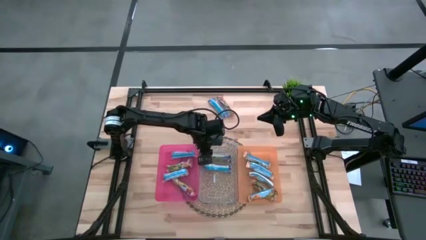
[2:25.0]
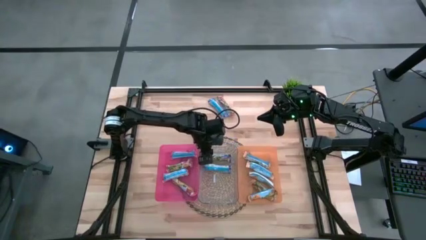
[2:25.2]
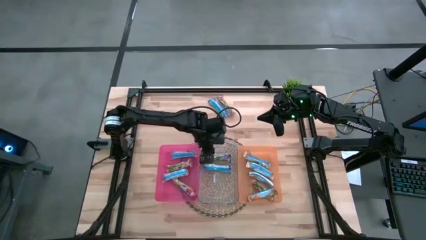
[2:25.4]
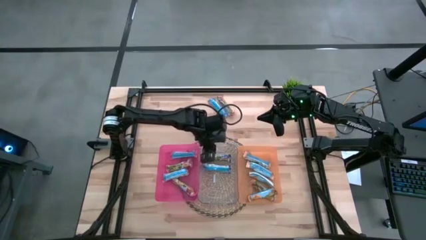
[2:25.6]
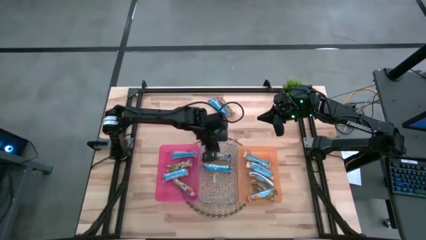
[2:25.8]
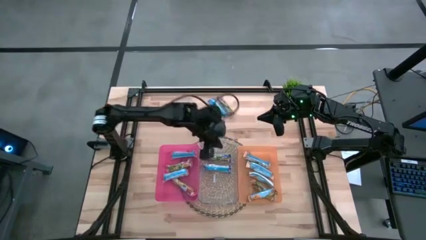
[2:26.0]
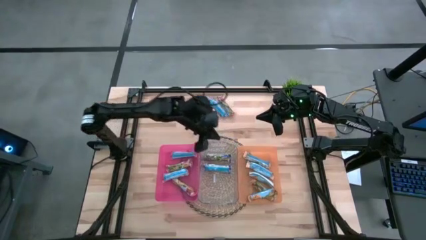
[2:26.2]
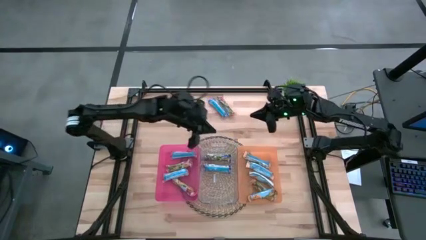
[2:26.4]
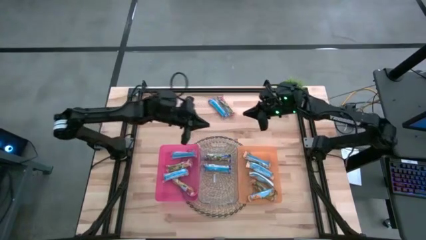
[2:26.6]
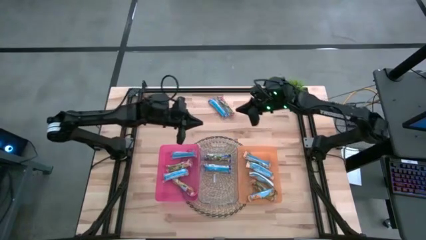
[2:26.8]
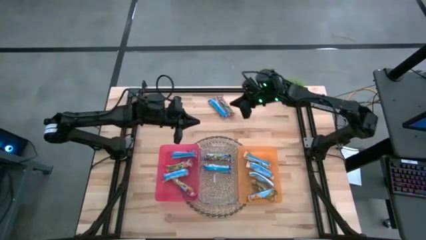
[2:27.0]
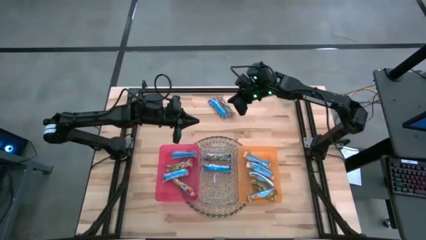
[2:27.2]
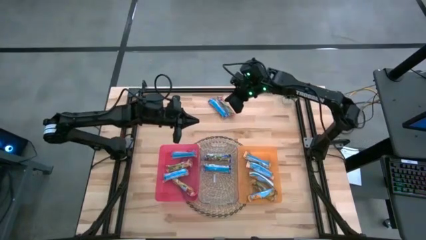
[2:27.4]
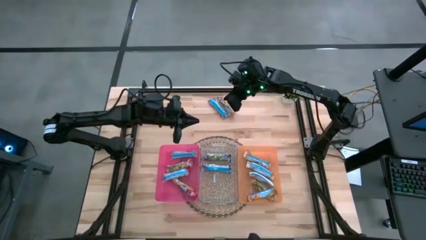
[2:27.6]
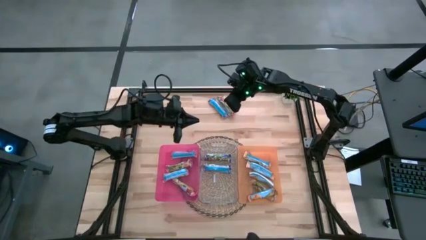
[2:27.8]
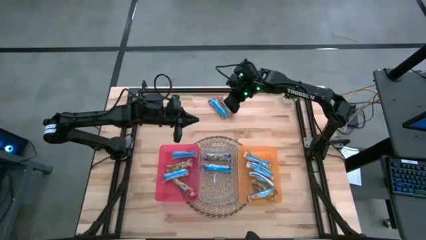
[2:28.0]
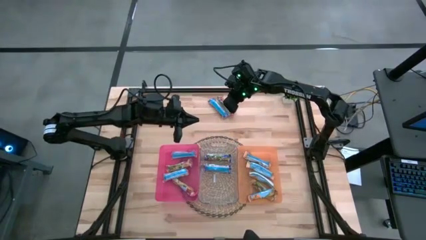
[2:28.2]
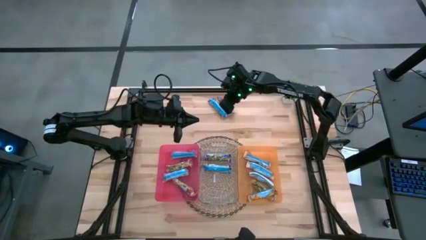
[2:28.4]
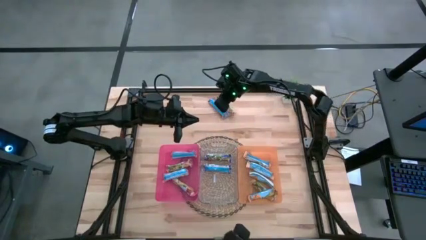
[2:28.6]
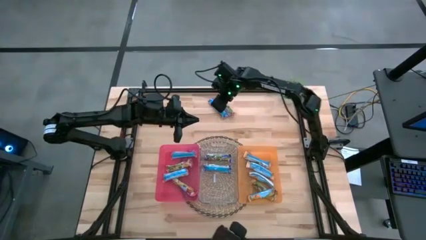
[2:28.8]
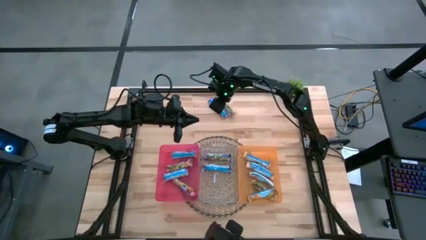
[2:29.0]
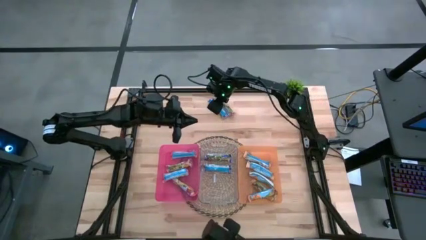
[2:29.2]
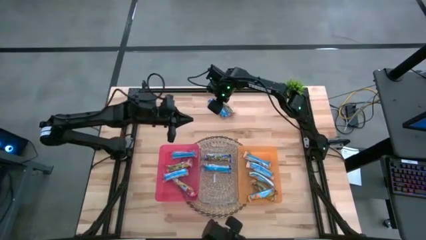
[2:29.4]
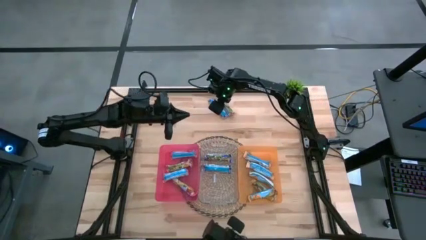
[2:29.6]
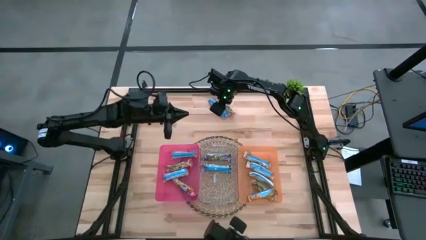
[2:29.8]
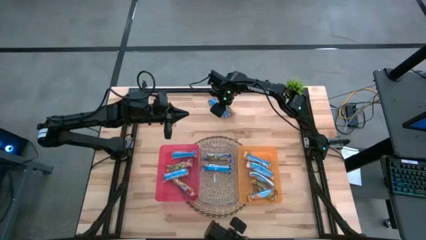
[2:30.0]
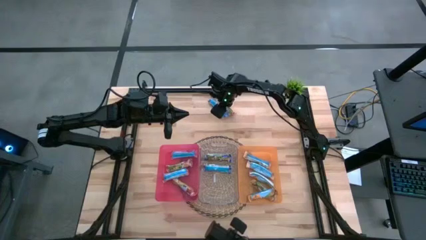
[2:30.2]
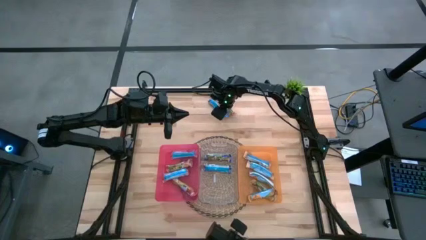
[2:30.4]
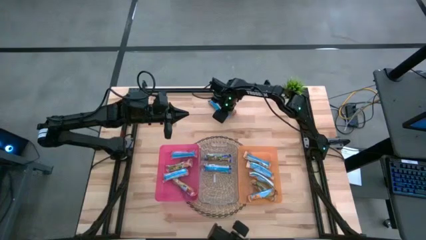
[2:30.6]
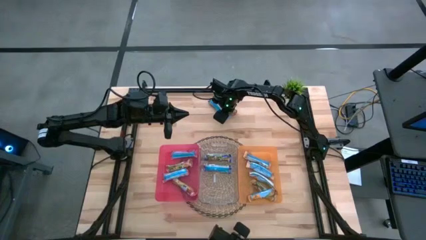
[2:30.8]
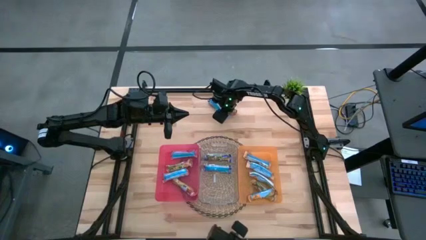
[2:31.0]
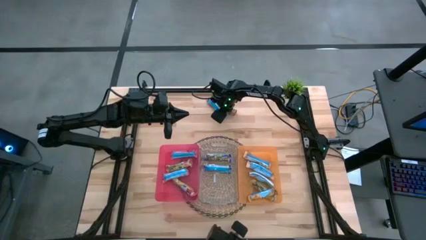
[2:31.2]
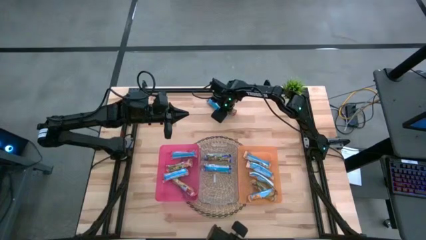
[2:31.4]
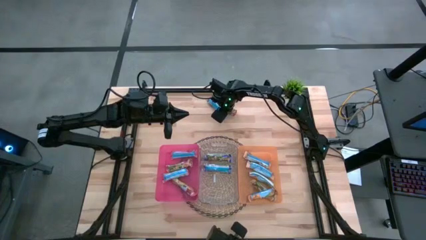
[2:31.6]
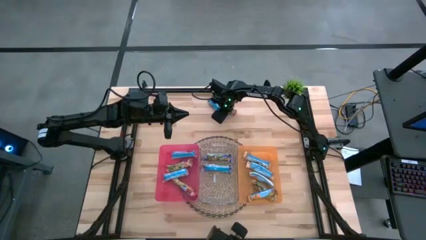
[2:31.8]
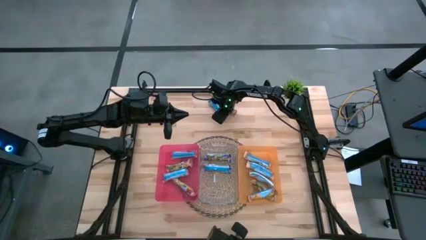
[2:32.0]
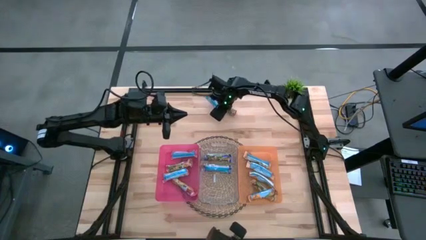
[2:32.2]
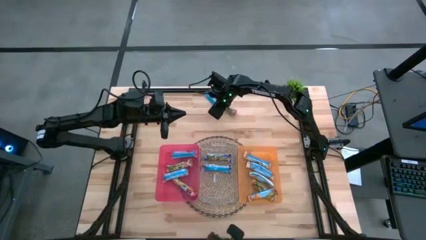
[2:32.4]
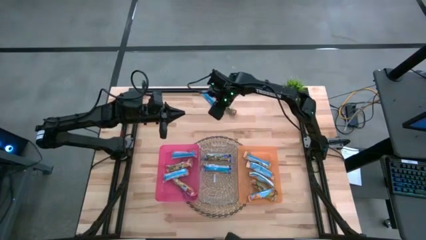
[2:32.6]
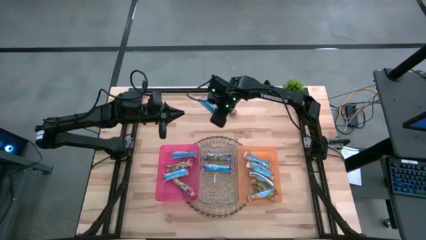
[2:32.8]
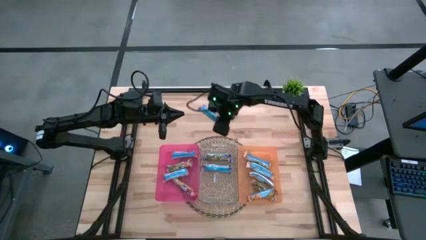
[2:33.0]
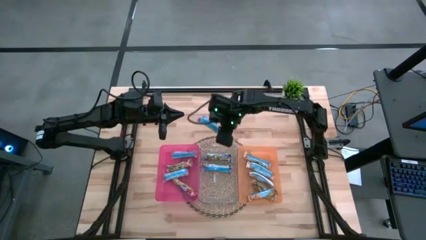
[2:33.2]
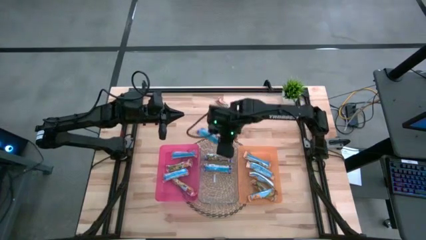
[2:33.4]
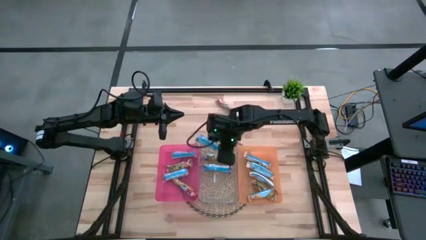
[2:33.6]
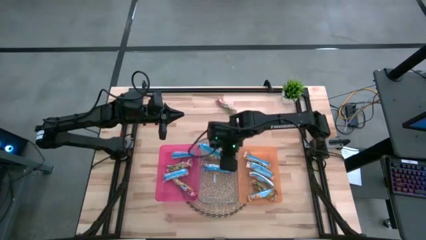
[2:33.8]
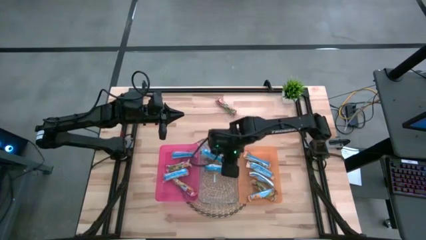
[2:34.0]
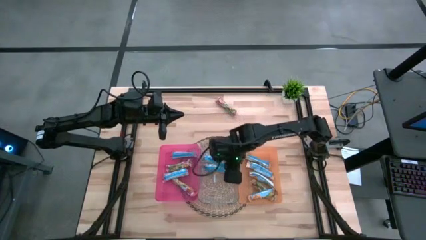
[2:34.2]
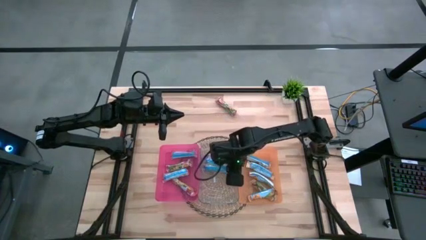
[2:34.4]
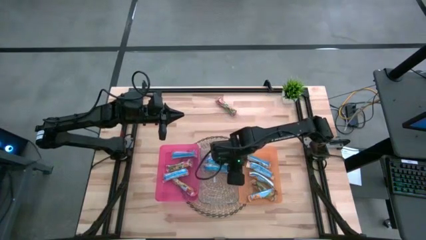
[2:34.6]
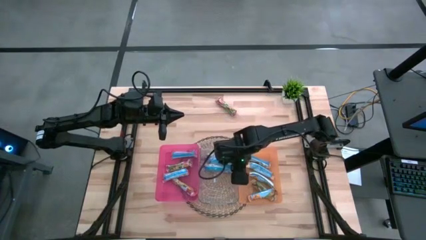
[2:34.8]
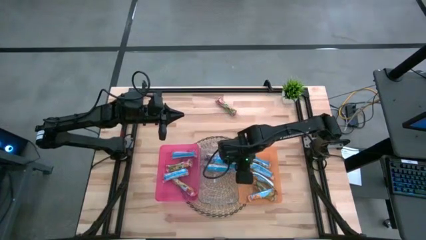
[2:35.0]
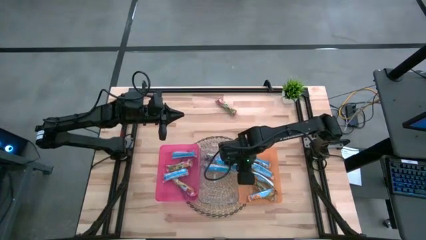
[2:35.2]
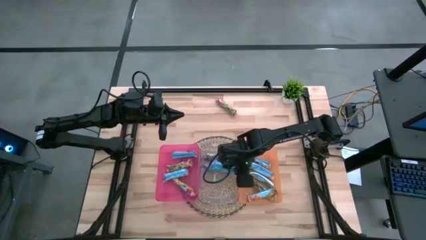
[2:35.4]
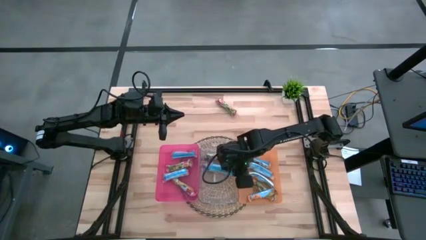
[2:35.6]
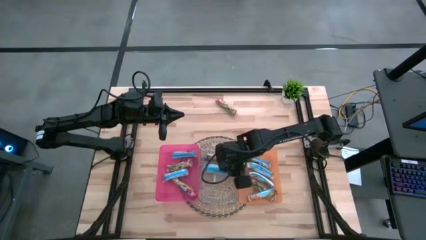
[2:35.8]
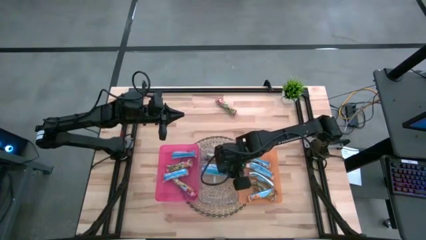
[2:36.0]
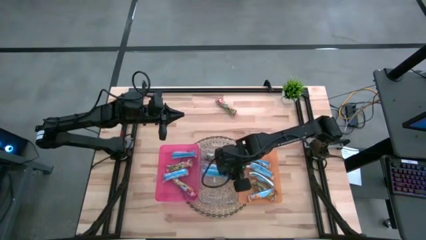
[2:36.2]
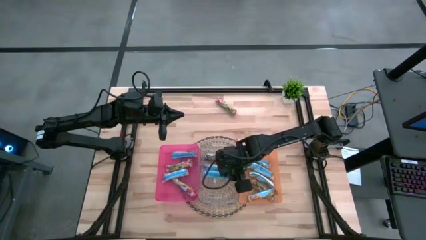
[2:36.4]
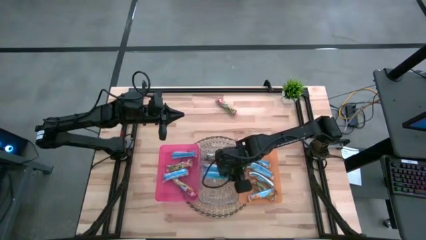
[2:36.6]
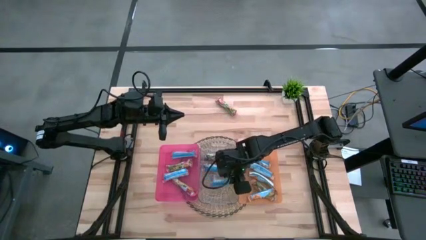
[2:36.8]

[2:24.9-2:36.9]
Task: Pick and place Granola Bars by type
Put the blue granola bar into the transparent bin

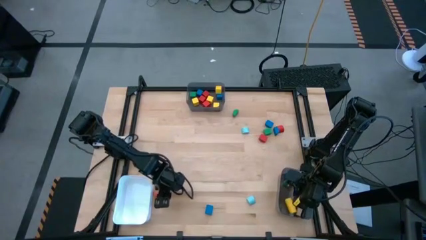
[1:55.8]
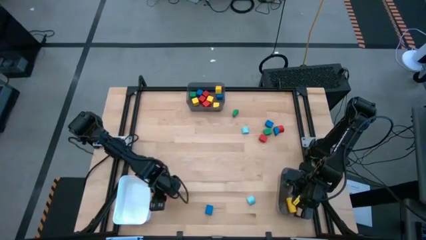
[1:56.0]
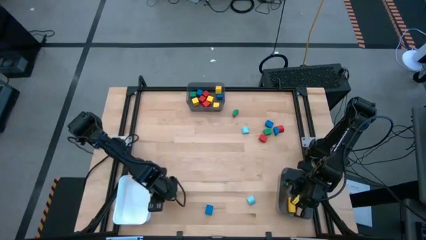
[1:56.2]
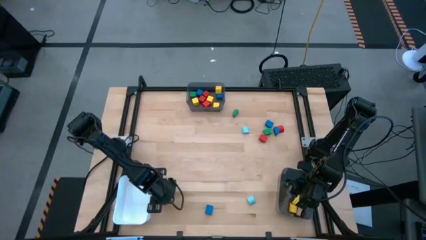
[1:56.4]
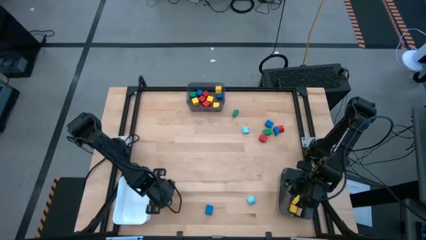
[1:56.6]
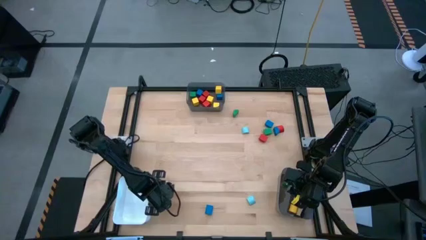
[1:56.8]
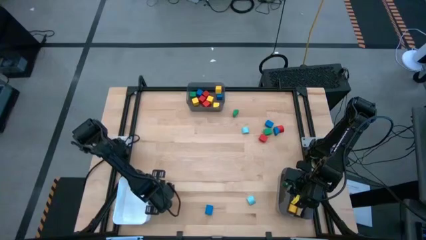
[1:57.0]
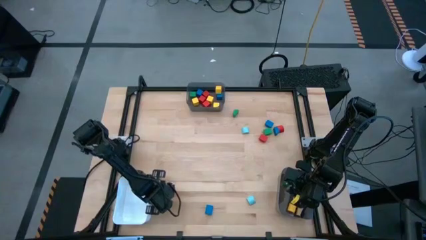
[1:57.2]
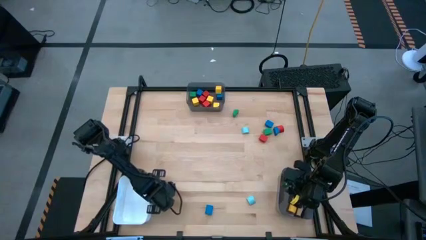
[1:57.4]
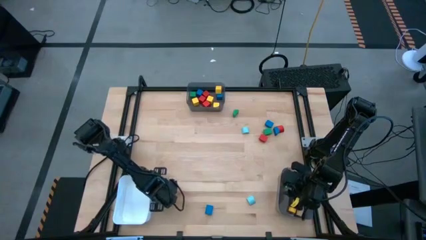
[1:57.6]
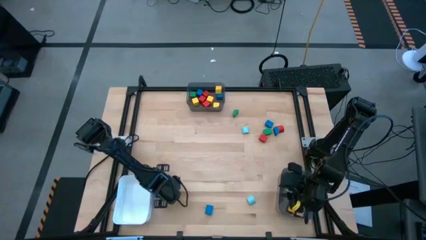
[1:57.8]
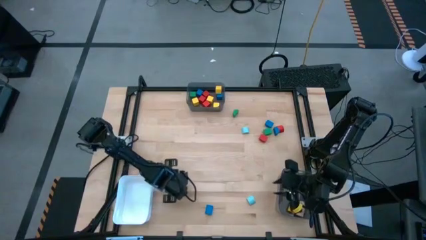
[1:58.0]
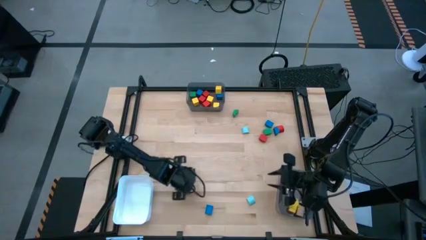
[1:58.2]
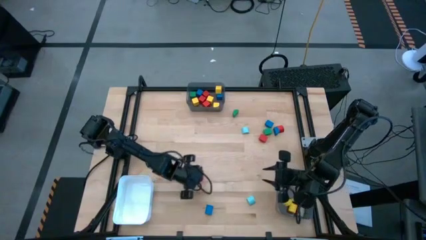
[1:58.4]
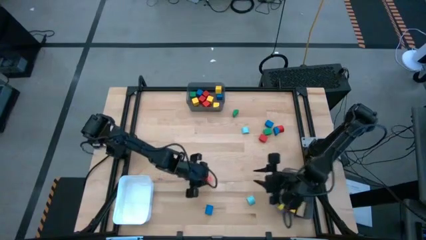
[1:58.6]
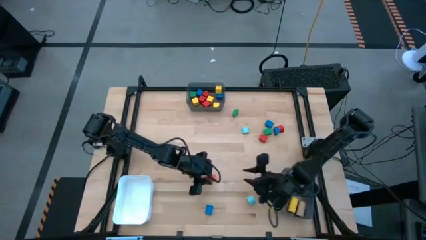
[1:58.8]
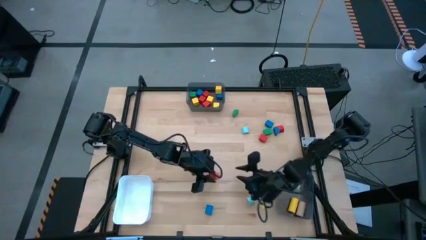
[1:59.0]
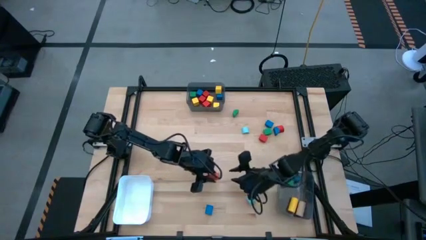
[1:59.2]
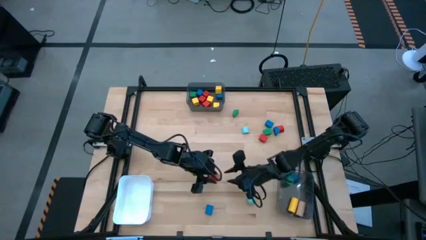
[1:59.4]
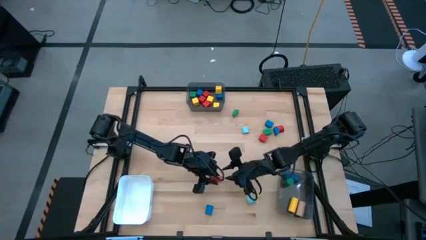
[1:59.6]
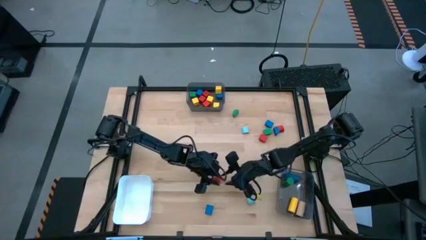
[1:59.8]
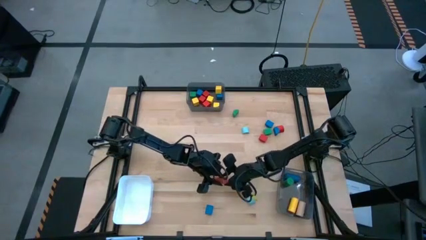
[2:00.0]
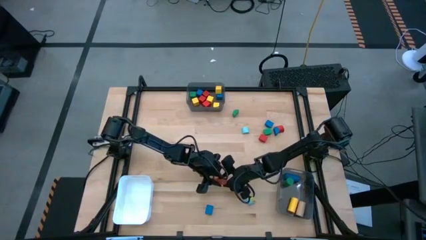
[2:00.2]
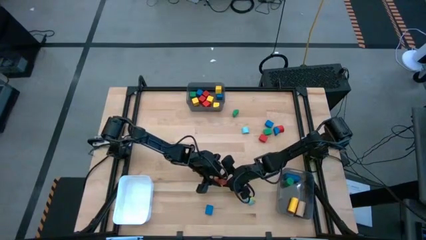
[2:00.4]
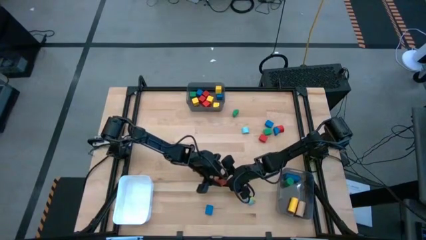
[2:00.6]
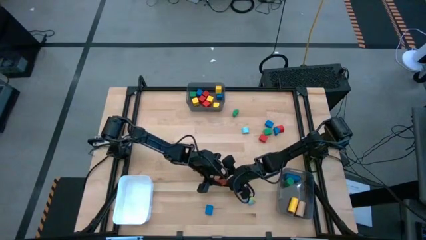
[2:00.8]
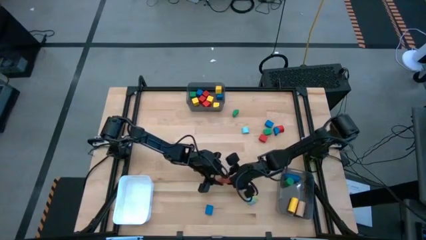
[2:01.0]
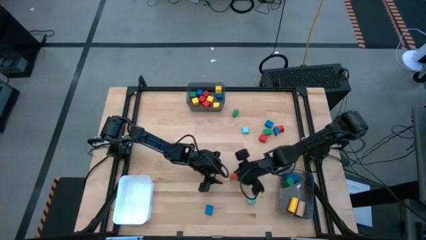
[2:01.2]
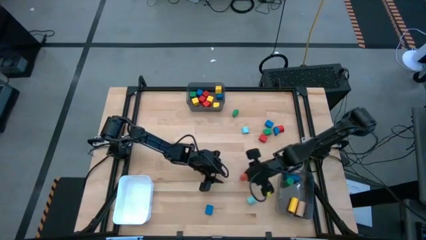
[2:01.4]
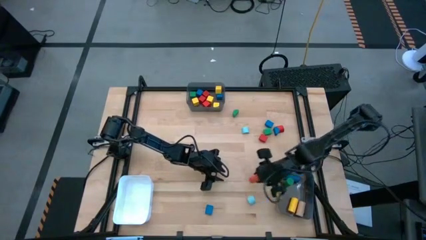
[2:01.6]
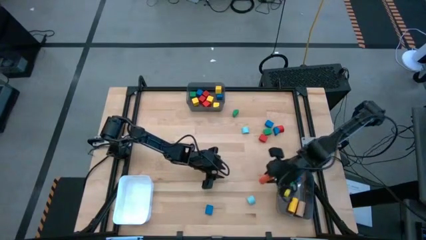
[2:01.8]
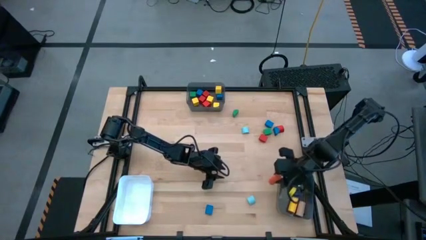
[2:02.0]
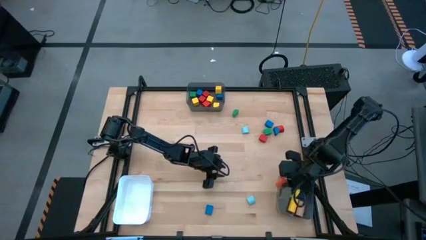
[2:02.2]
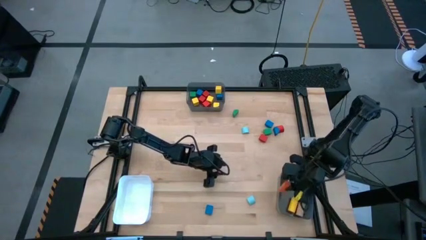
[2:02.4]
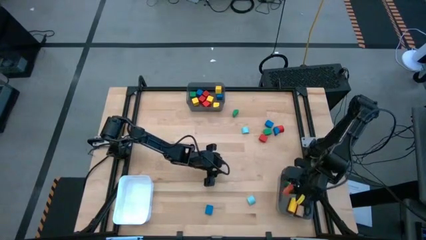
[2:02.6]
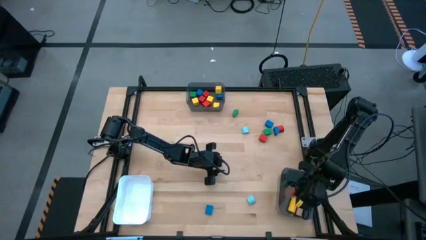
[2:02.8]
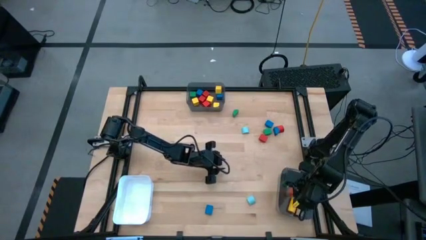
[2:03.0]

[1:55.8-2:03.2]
Task: Sort blocks by size
Put the orange cylindrical block into the bottom black bin
